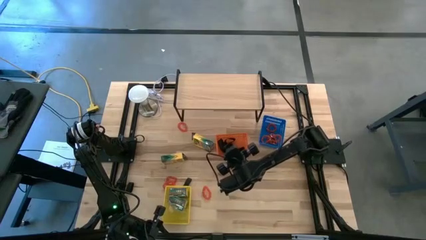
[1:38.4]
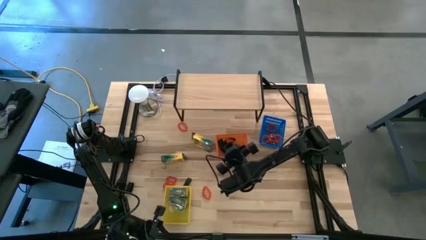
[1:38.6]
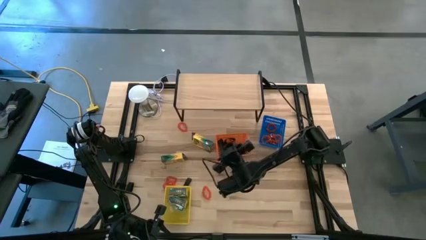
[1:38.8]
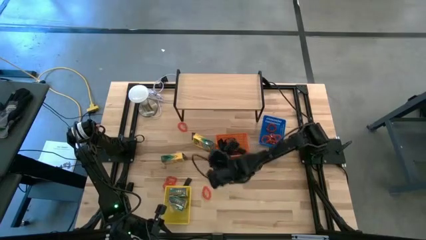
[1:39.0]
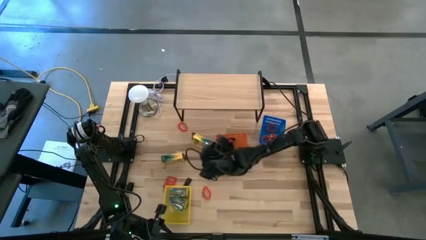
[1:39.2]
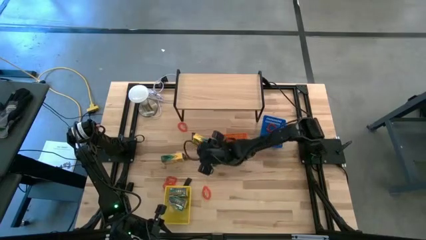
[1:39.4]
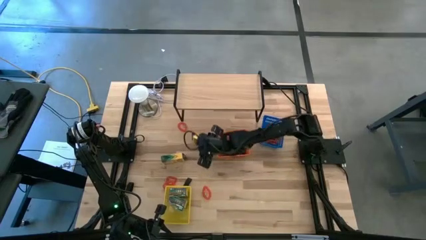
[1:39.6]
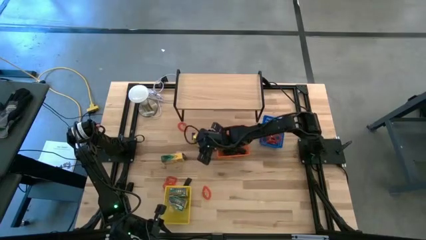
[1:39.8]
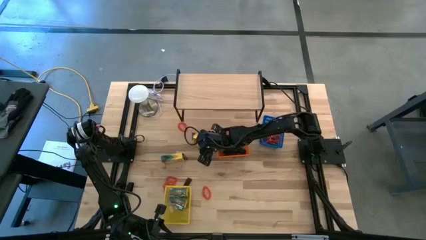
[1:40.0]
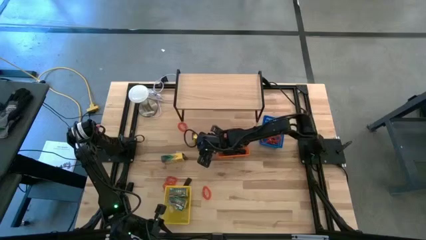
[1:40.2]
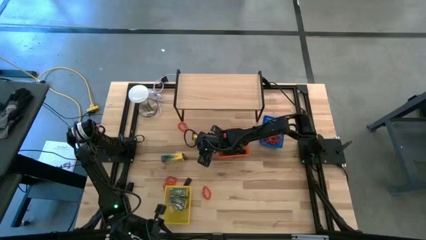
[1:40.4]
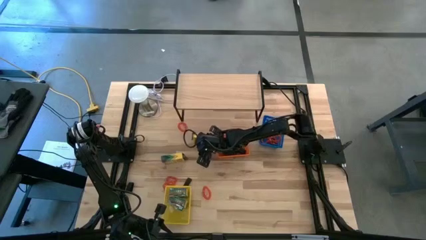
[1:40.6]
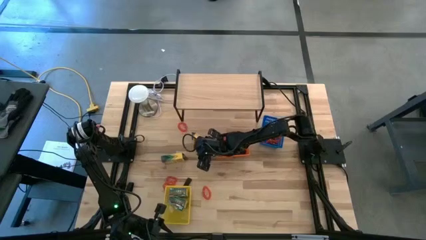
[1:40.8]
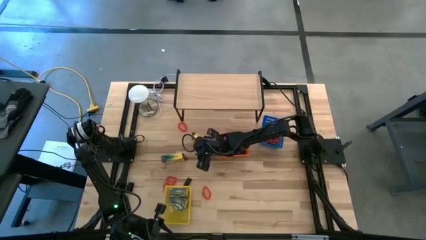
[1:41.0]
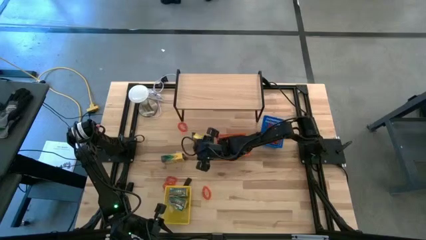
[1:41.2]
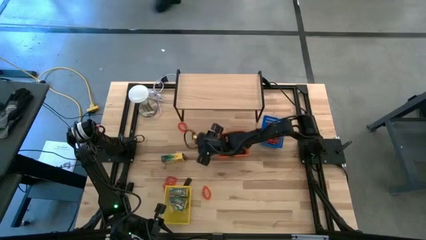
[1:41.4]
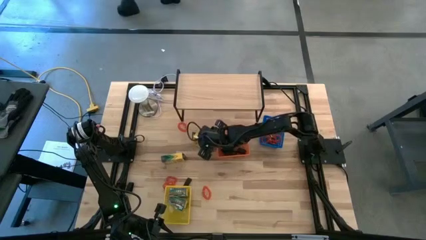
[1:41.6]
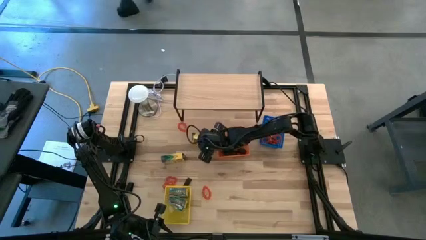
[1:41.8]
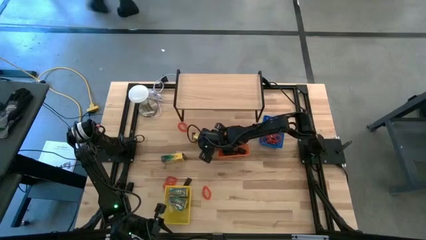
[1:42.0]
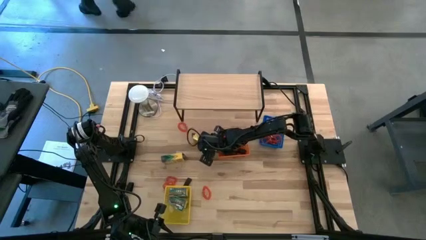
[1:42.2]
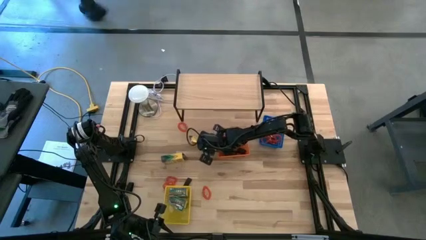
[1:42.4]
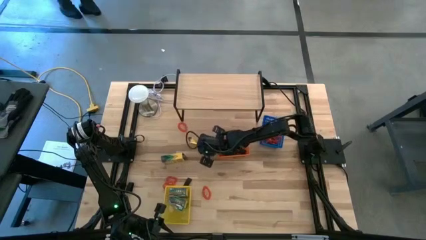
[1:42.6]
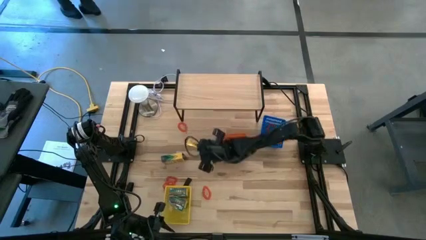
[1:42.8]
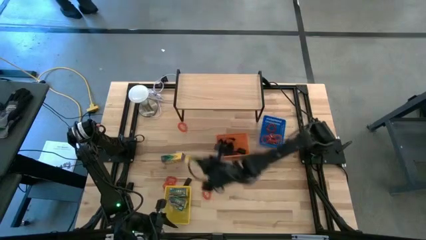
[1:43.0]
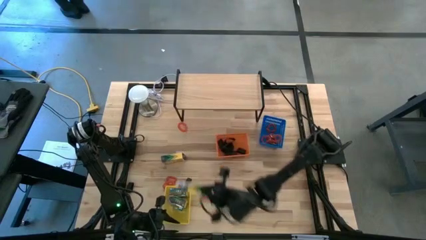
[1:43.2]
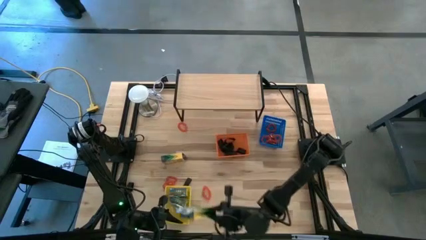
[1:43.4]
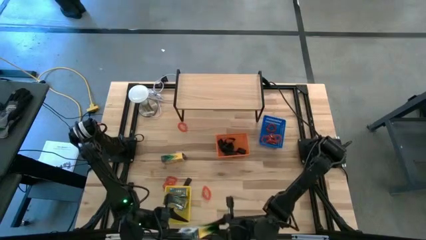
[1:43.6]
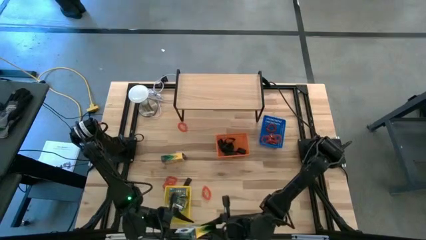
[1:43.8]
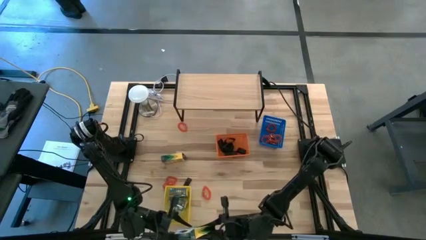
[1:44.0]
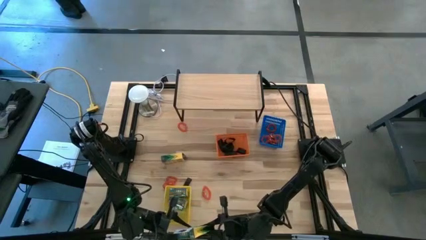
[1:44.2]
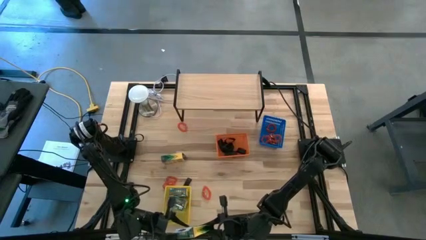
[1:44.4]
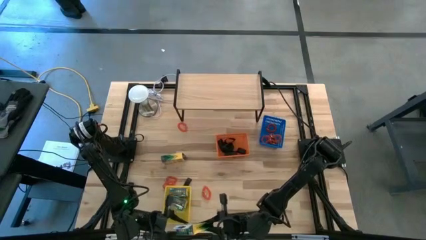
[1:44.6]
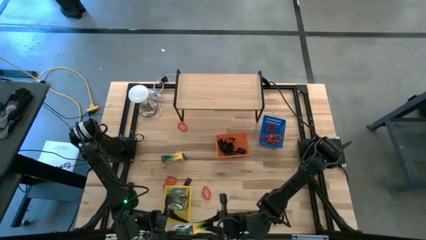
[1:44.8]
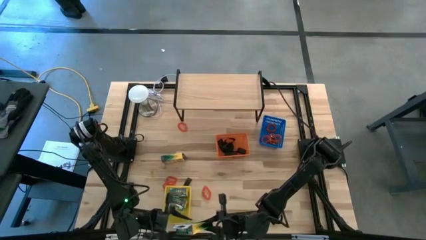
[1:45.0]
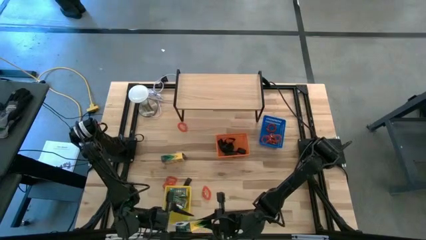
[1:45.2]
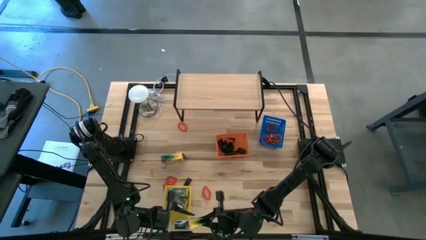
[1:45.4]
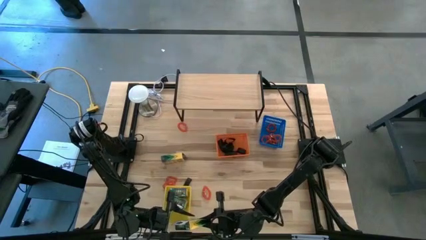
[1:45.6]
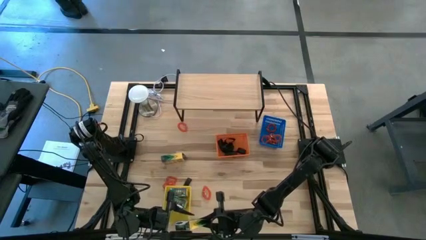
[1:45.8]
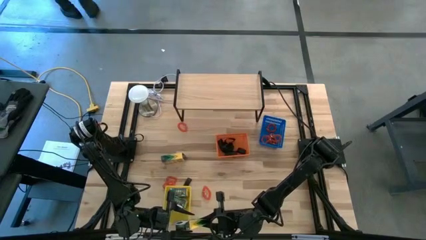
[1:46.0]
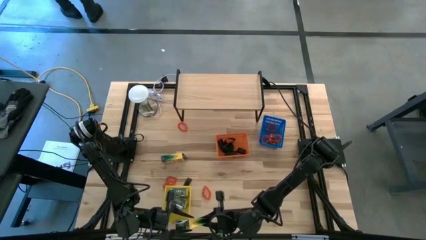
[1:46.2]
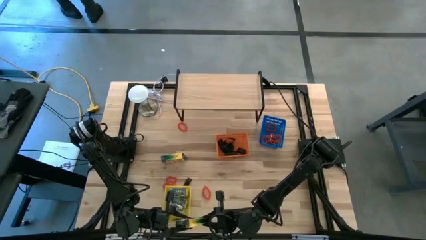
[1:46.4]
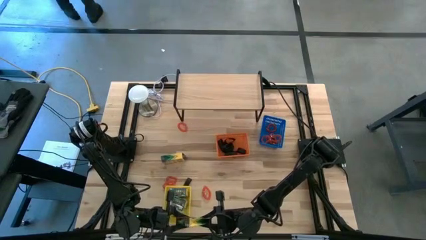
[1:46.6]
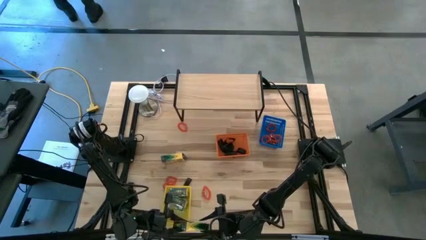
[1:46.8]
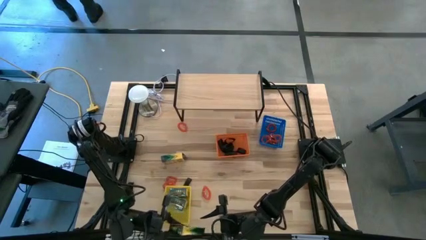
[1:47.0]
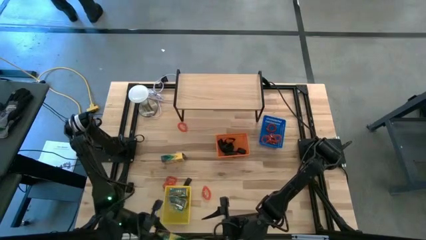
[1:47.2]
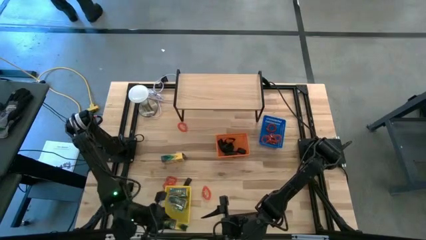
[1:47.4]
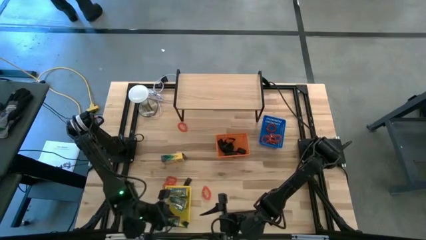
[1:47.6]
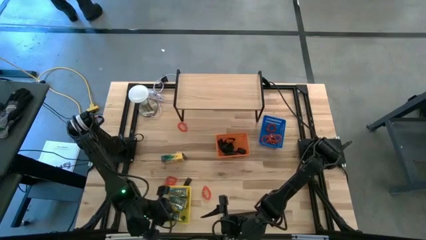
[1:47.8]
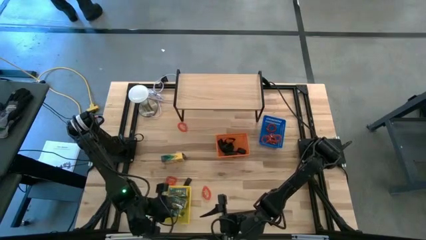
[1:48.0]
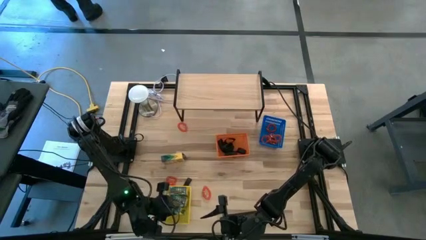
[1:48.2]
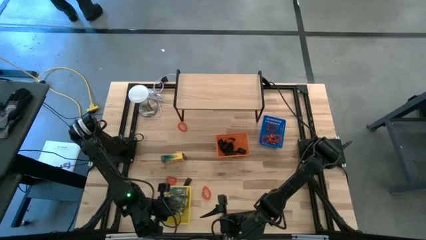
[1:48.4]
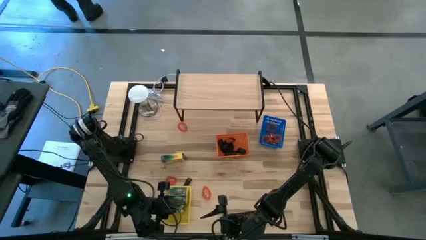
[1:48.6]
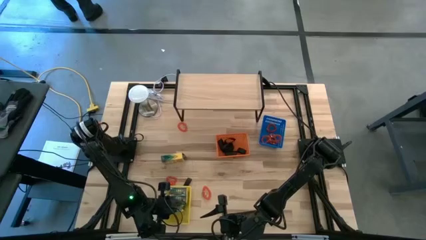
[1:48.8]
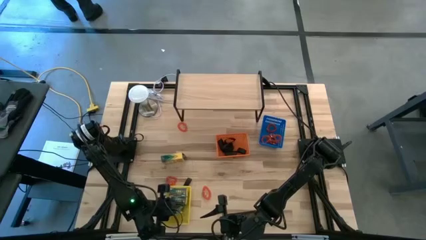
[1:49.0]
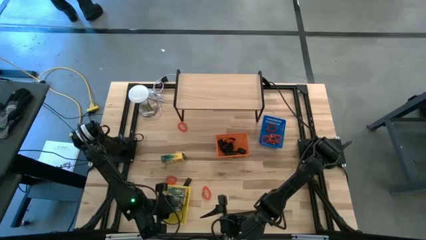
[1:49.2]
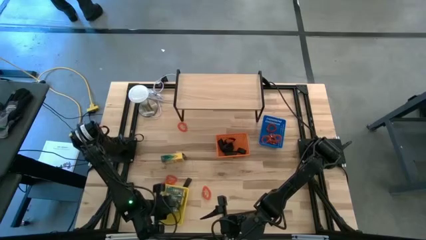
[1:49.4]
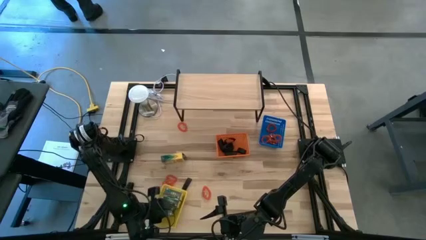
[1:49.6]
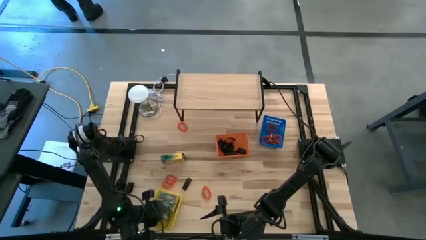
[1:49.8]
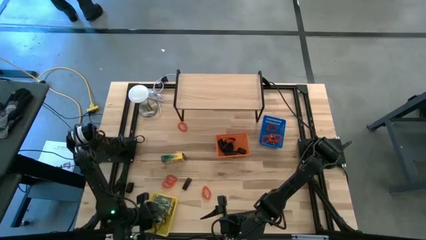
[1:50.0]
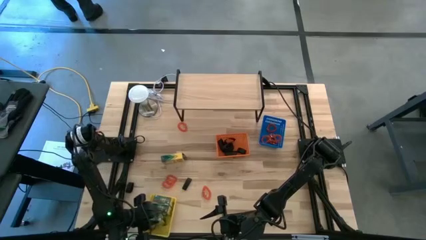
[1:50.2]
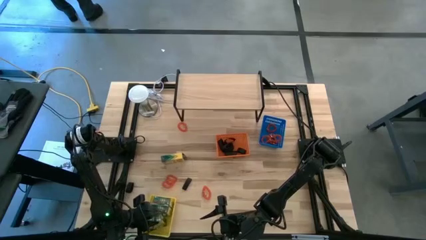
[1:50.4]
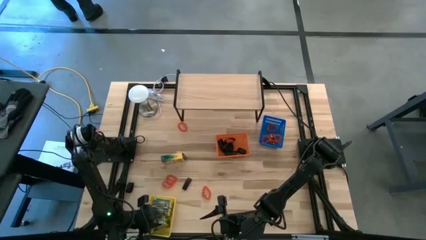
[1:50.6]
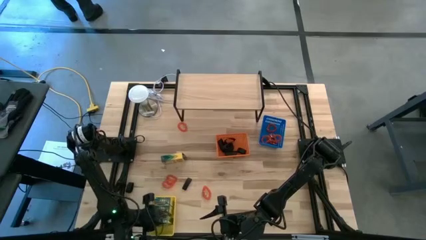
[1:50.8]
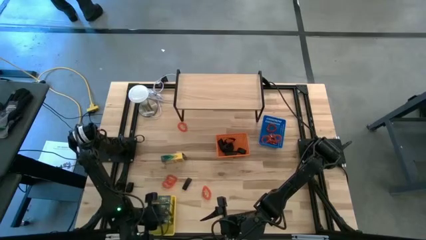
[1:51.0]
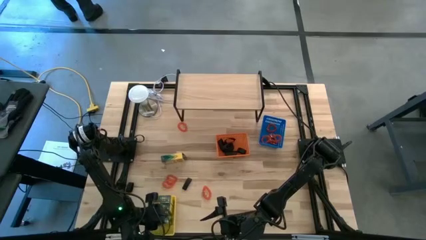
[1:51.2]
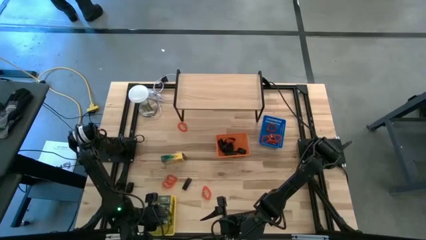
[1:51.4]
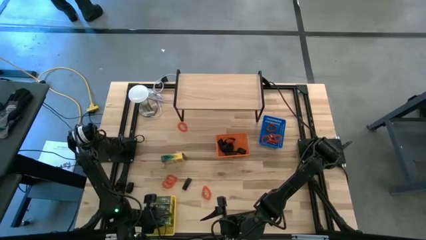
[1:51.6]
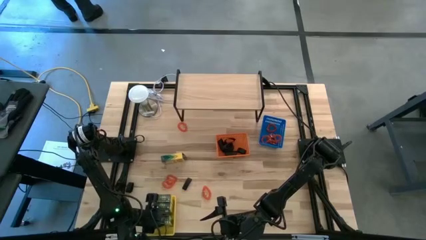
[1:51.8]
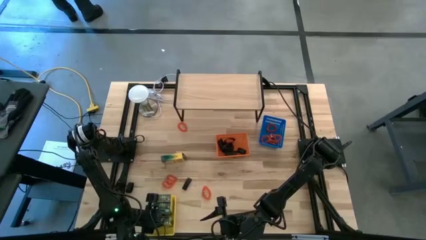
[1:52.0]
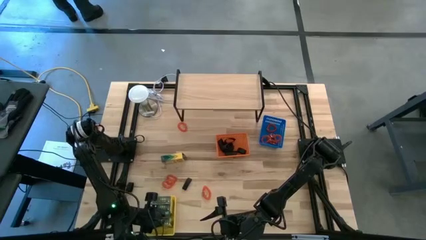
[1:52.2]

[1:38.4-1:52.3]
Task: Pick & Place Office Desk Supplies
Put the crayon box into the yellow bin
